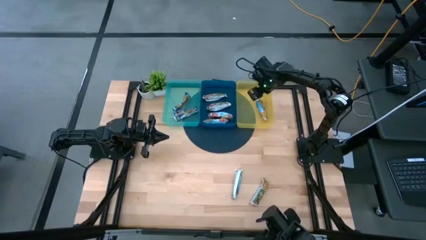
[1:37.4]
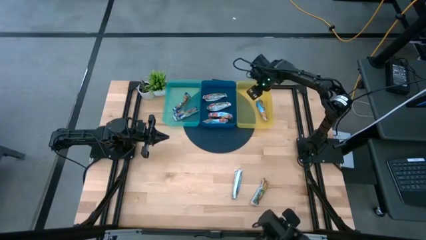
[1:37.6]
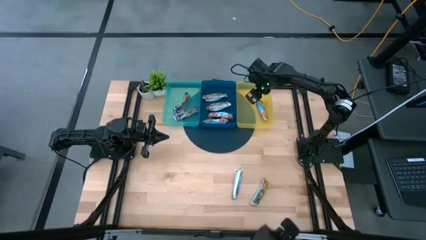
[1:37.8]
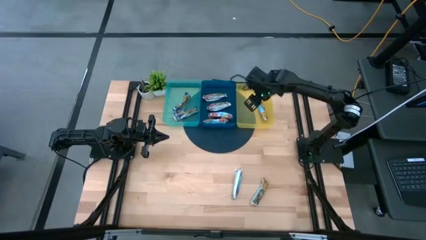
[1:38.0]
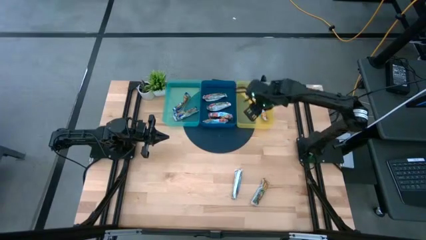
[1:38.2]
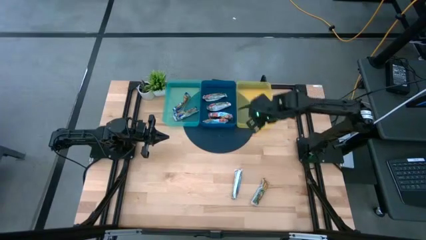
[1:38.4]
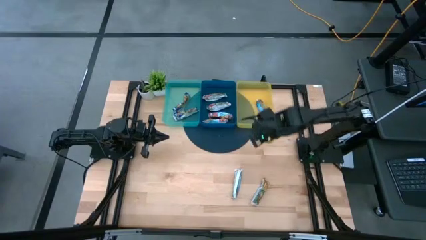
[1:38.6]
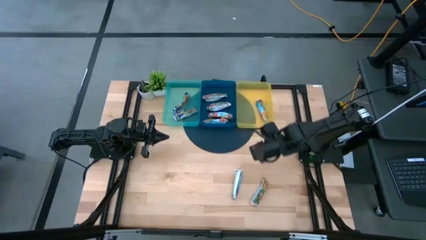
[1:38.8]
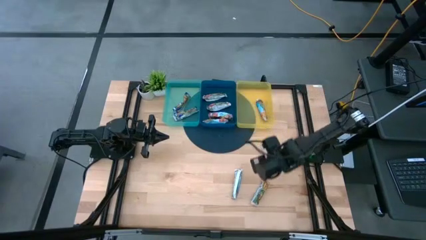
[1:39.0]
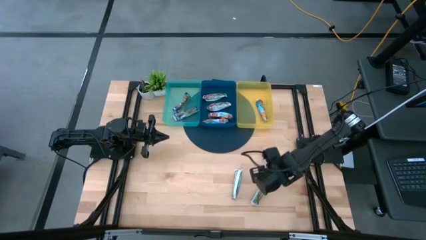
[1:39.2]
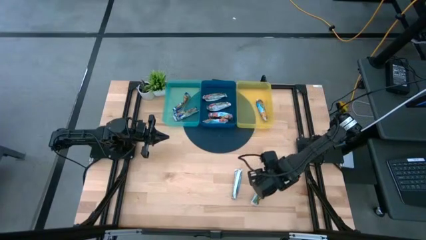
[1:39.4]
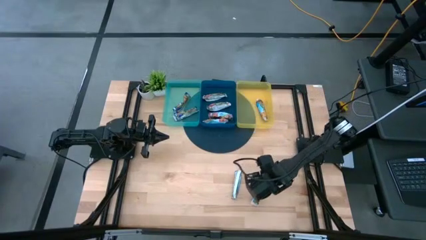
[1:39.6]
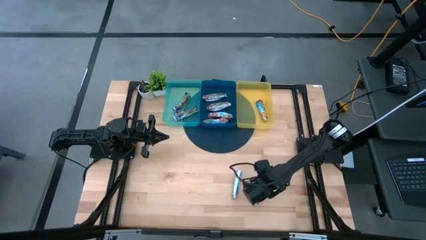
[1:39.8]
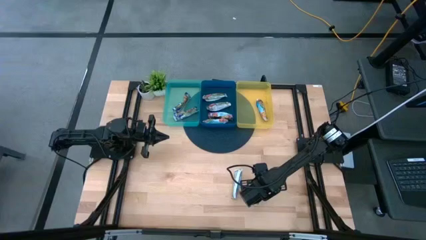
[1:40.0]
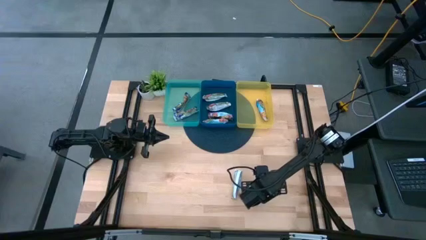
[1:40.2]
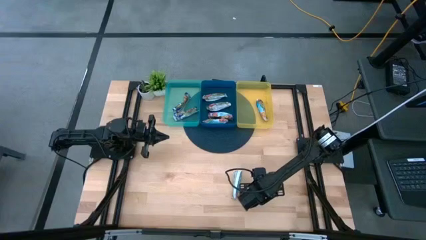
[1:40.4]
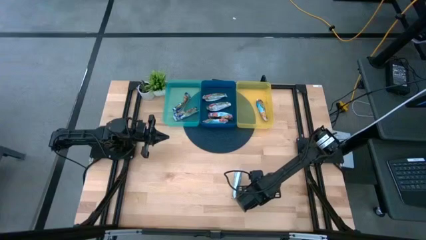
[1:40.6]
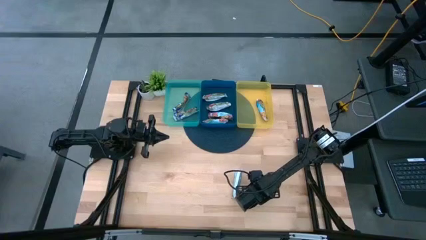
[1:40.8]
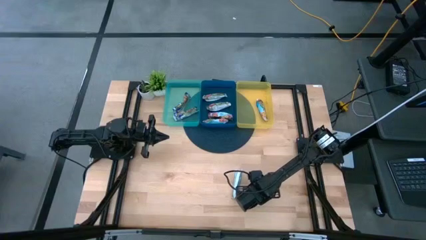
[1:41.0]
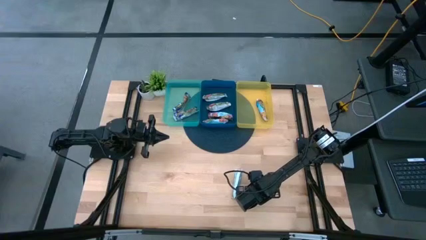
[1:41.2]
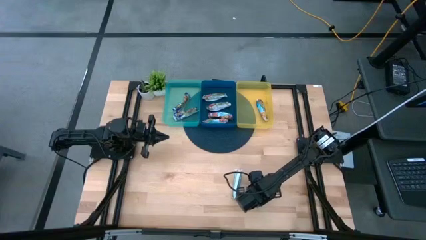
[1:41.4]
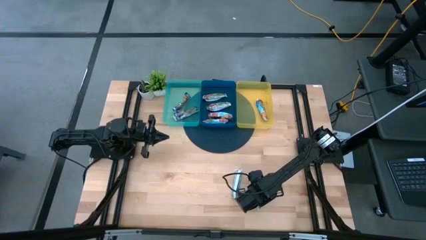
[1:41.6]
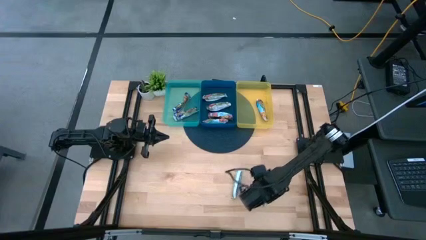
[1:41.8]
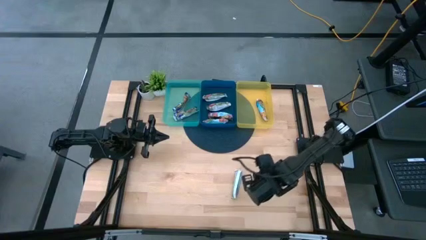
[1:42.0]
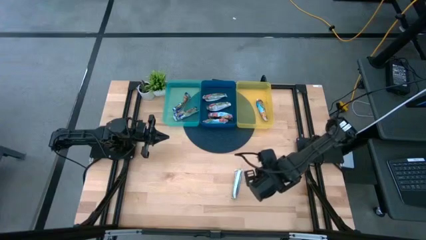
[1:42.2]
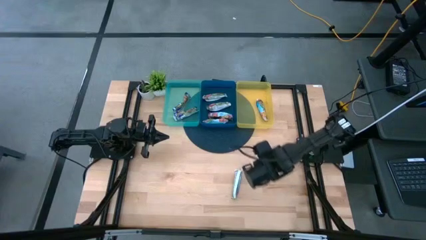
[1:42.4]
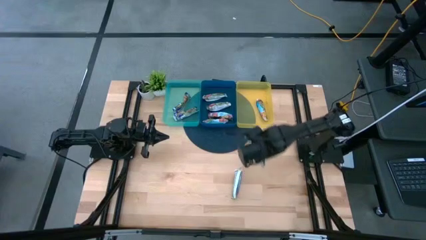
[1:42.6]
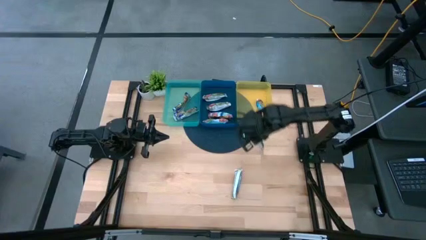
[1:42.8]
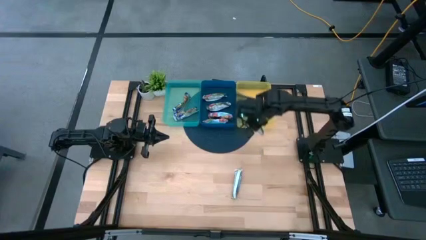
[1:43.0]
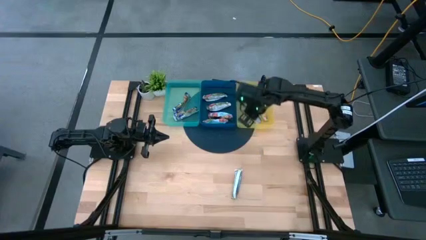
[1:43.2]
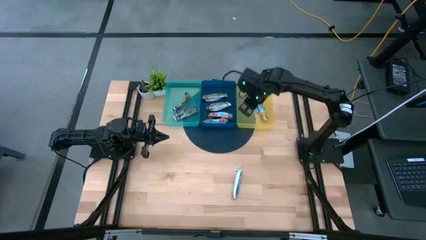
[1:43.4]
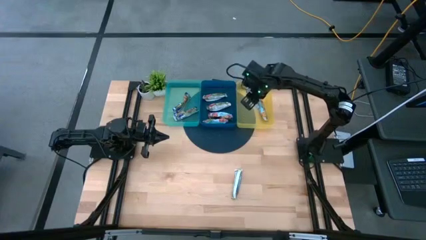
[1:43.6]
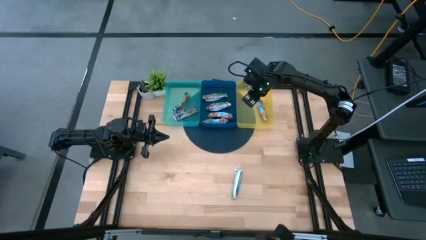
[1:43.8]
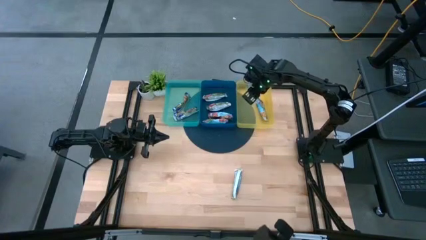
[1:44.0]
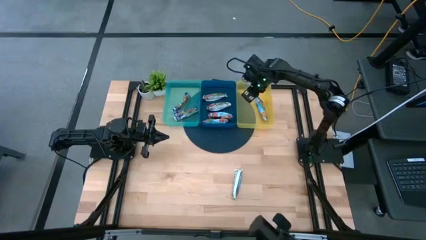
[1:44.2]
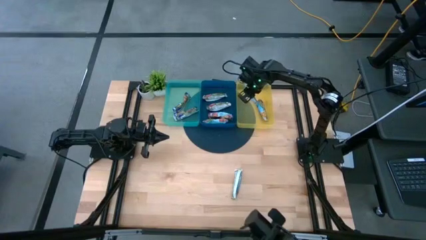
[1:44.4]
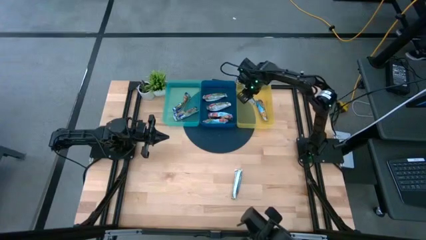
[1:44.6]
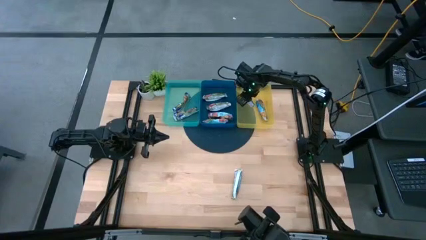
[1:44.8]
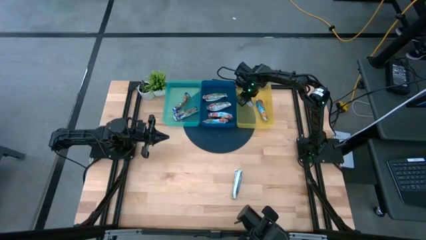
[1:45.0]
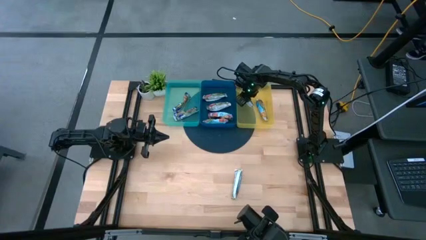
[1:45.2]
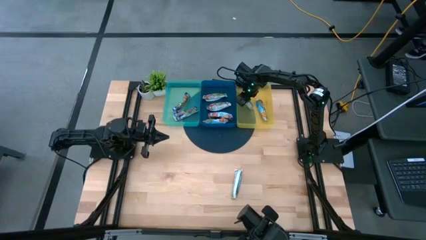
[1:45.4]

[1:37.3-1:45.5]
Task: Pick and place Granola Bars by type
Put the right yellow granola bar into the yellow bin

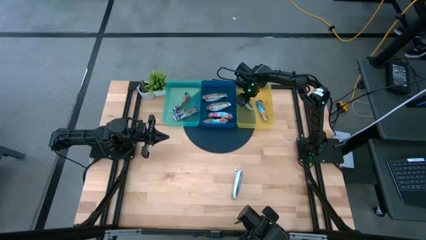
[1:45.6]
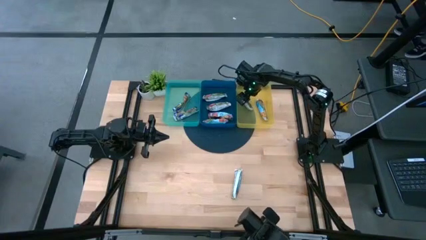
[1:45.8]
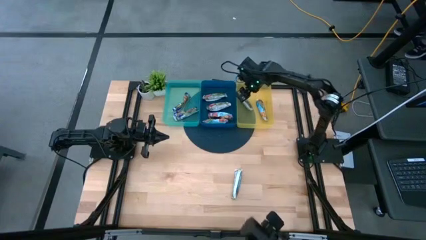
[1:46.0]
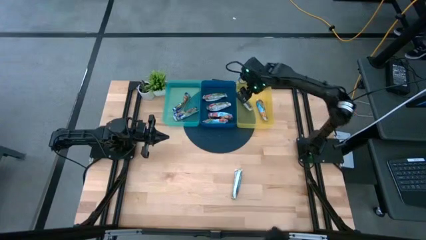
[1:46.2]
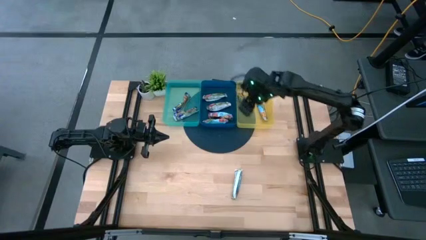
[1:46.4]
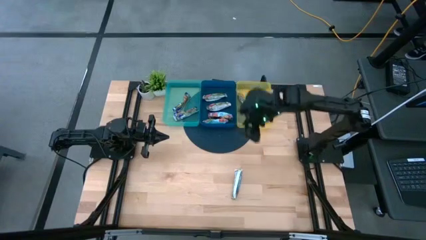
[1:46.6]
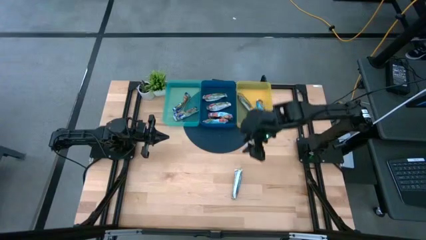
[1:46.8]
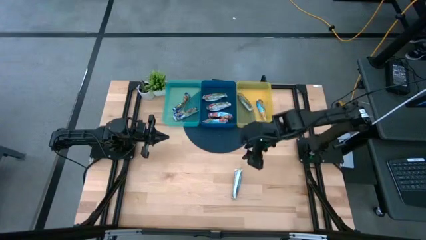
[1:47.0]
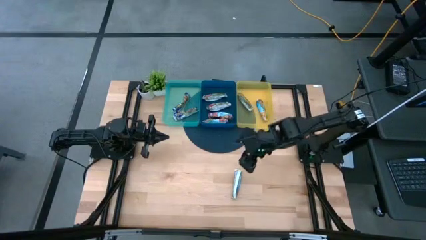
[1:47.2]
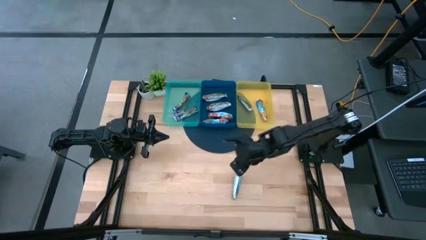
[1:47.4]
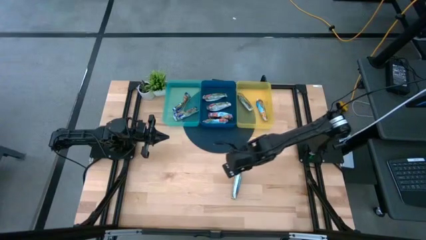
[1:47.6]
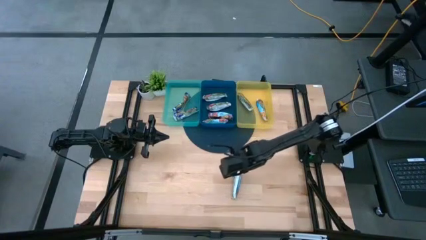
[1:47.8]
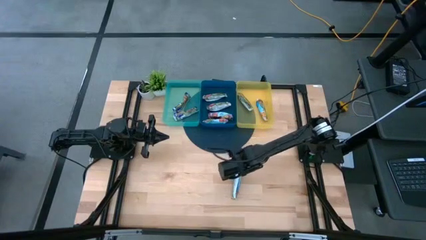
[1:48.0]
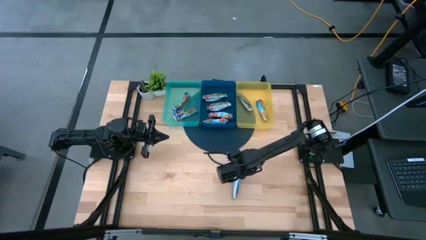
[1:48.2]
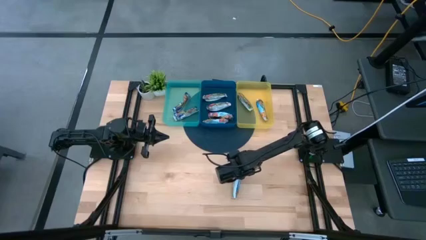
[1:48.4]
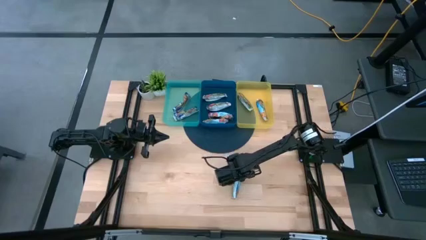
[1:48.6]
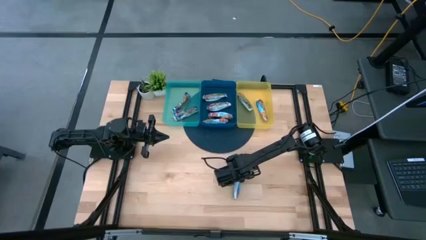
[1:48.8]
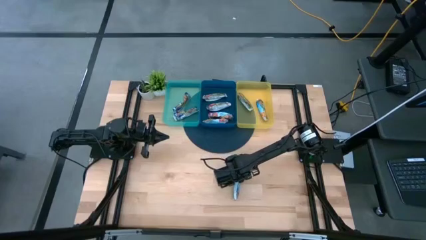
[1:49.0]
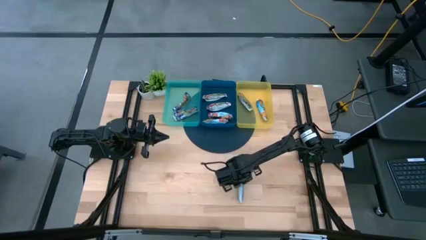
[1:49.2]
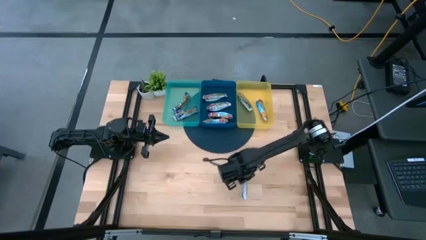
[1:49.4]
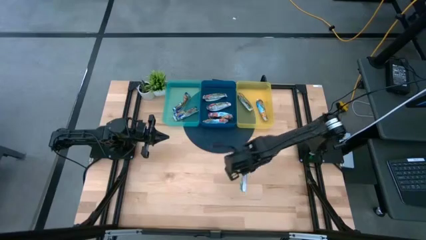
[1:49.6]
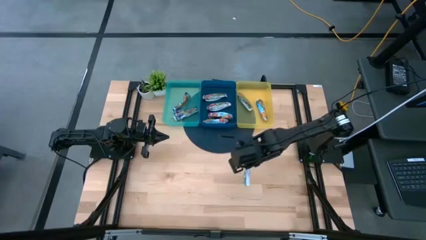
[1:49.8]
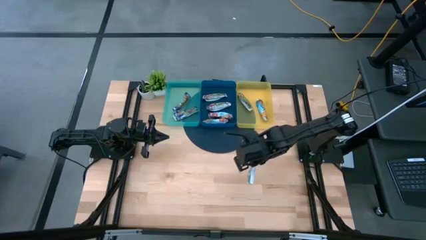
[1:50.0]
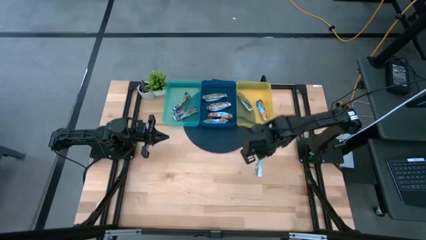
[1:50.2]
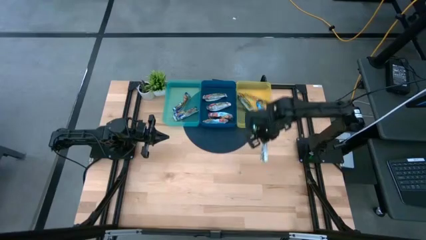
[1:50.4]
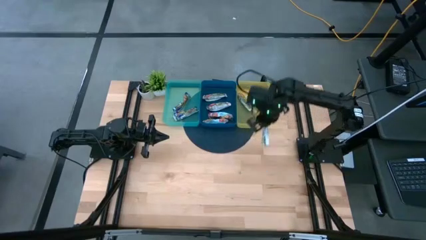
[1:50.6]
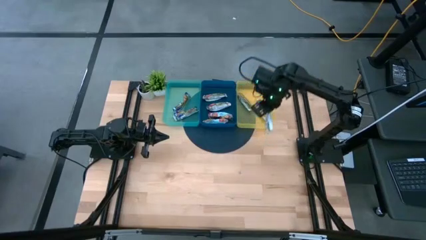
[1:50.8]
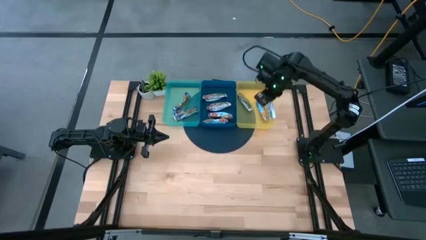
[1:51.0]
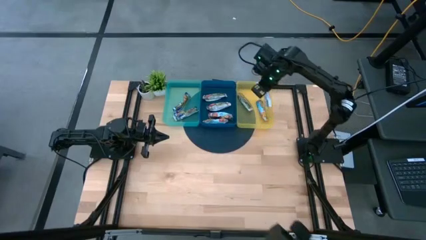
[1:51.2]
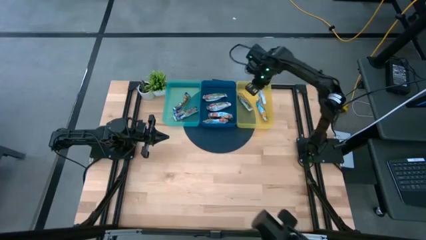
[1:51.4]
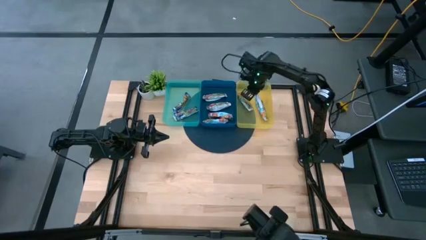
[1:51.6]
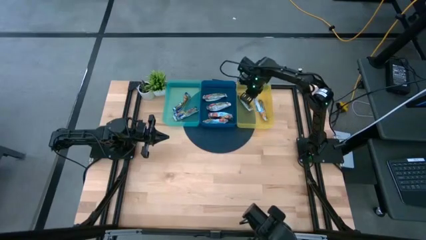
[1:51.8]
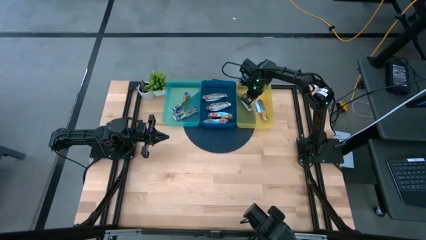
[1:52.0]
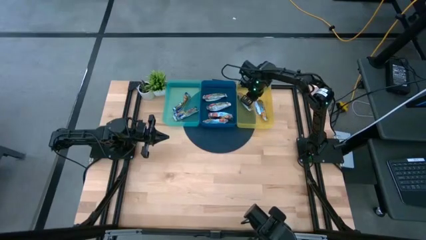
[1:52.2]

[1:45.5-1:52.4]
Put the yellow granola bar into the yellow bin
